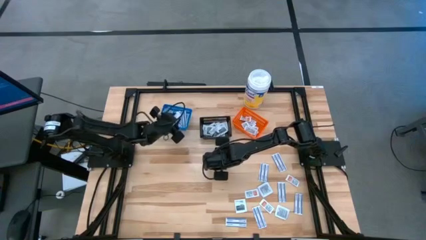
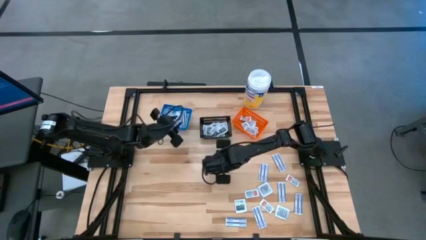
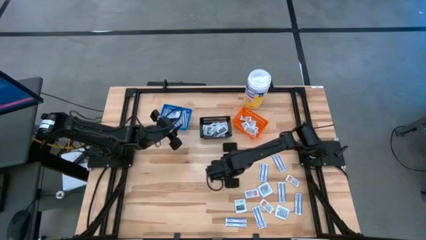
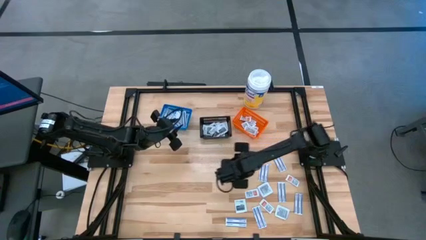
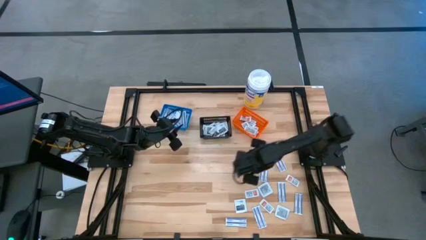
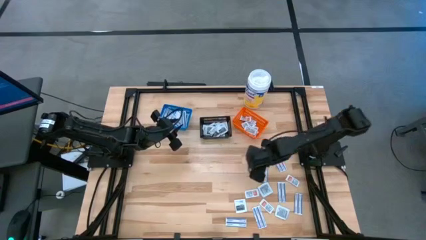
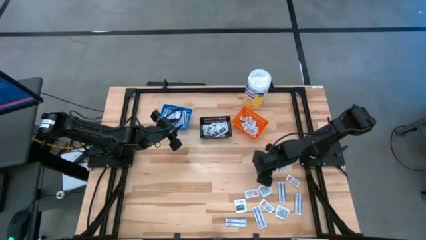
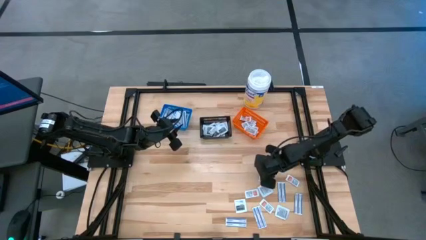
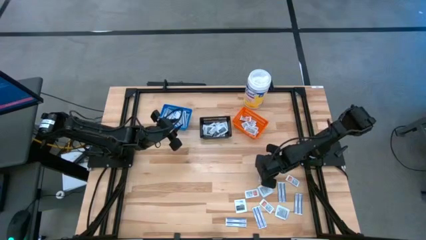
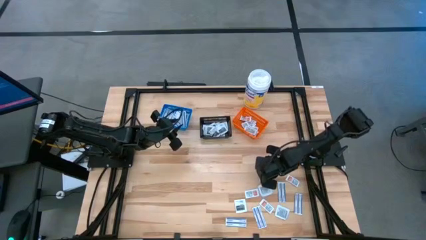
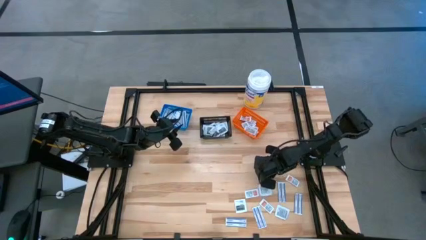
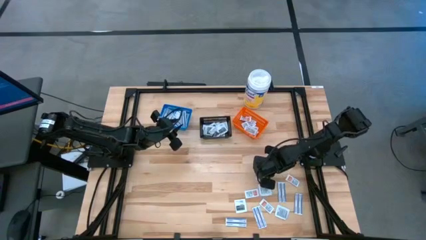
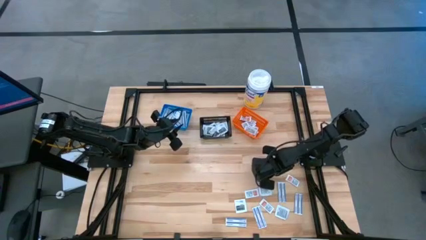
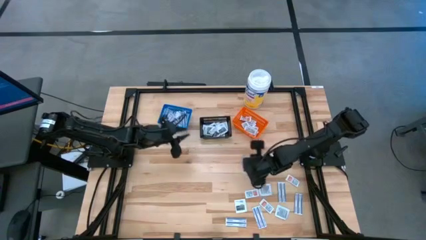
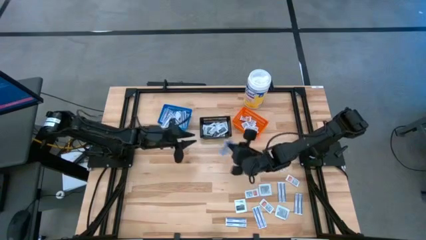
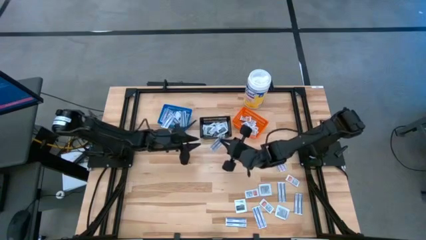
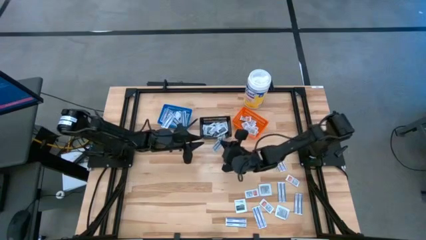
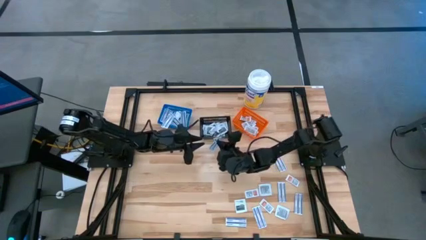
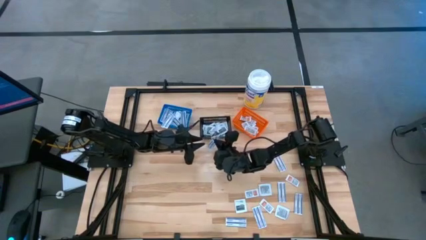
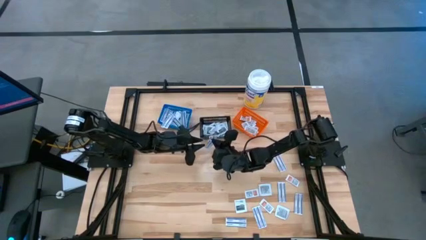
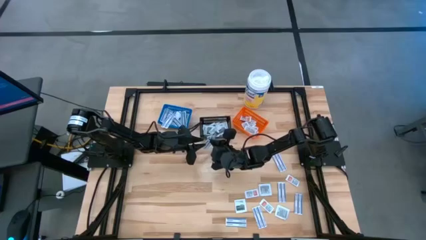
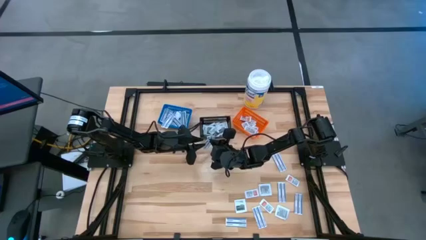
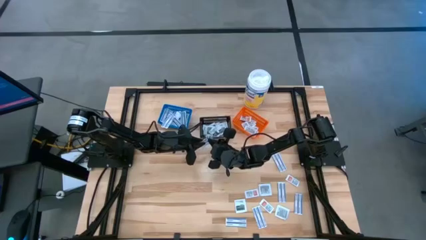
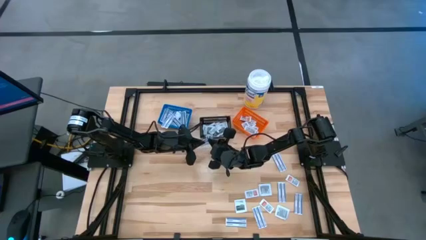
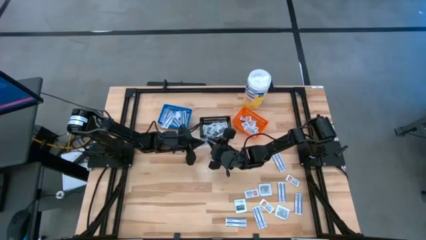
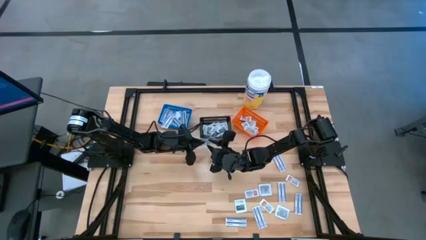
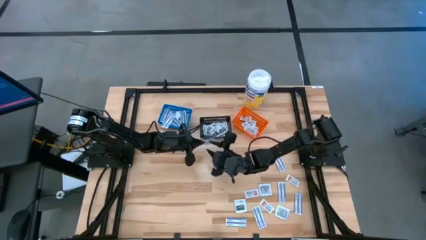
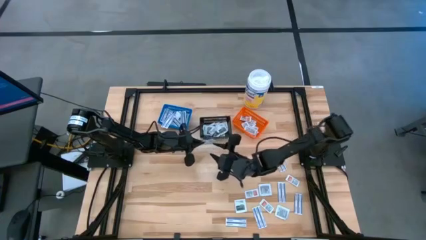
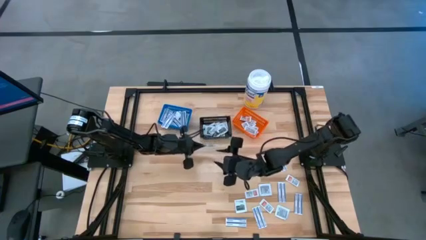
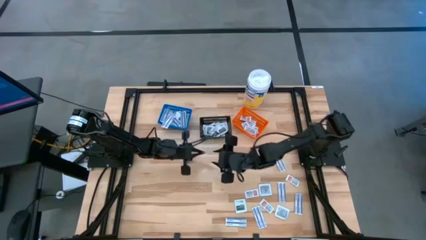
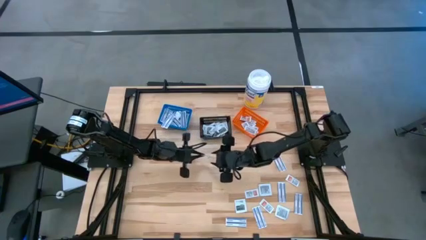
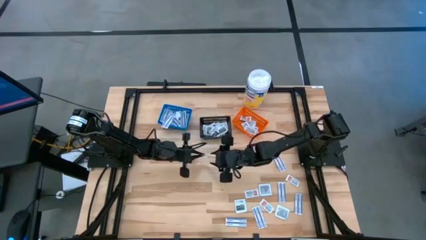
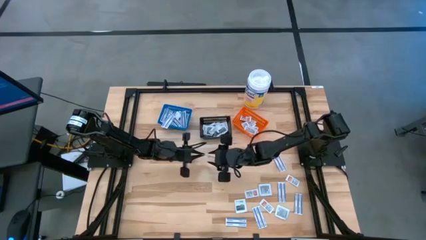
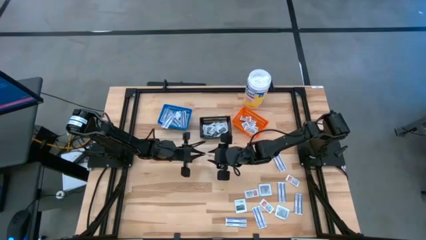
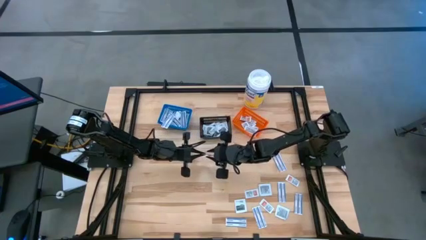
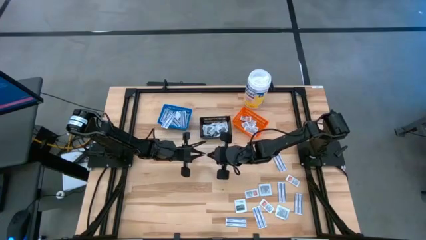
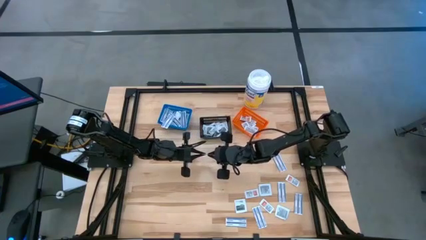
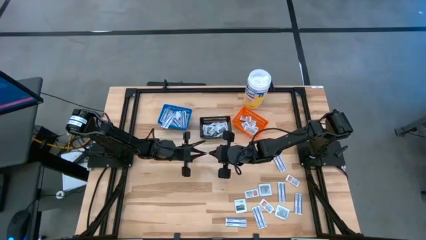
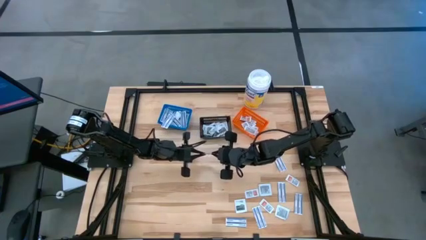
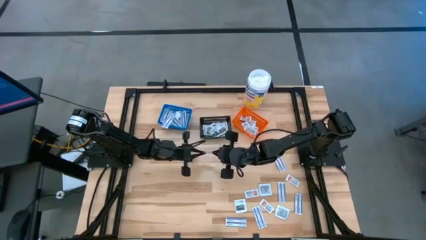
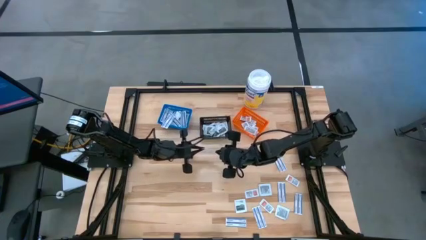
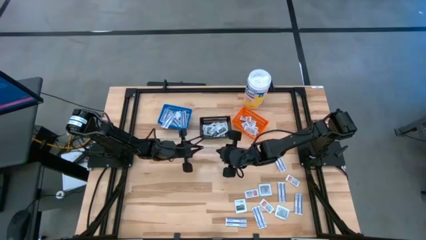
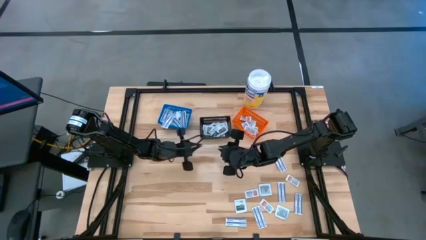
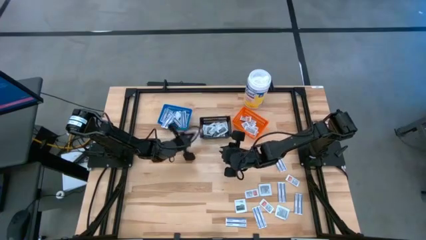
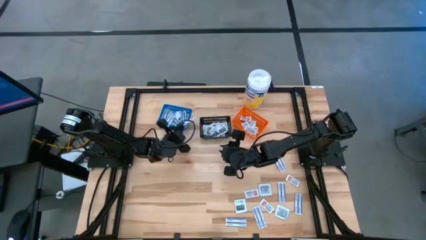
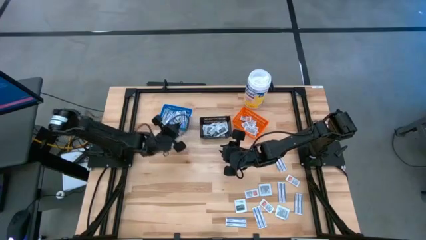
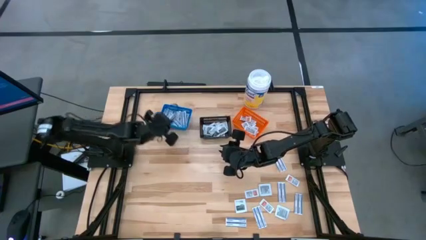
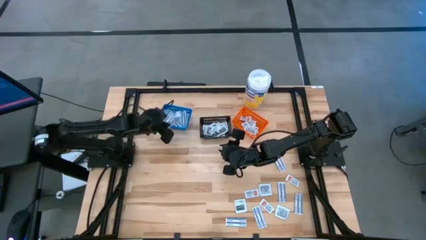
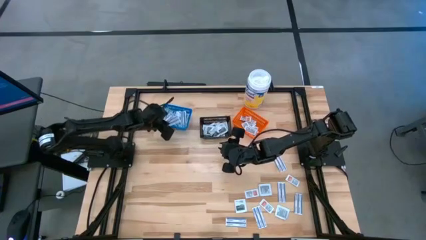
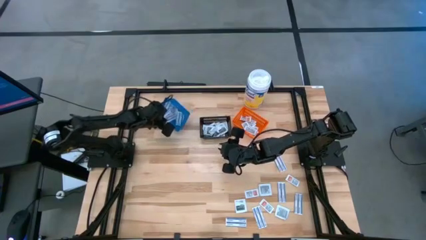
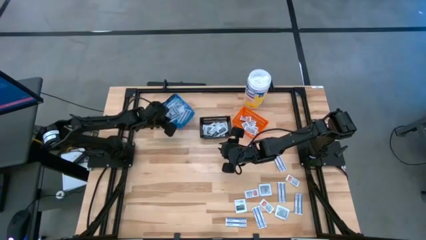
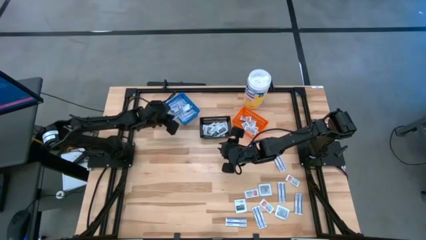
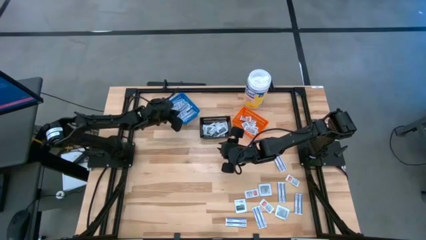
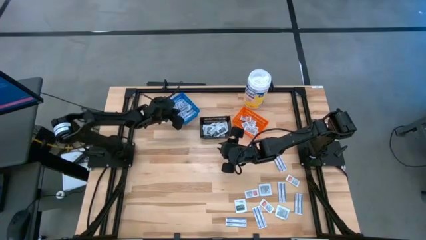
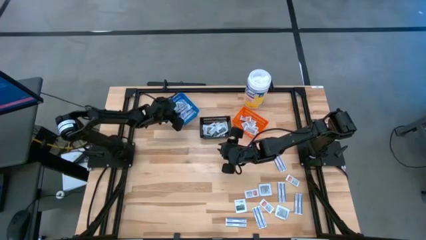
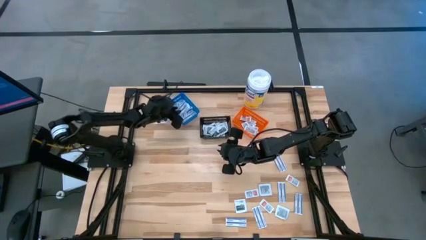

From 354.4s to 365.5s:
Task: Pick & Place First Aid Supplies
Put the bandage into the blue container

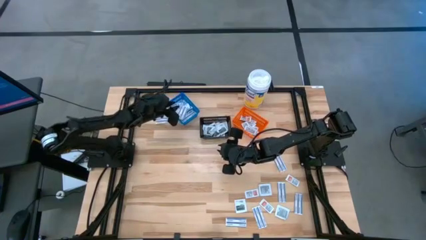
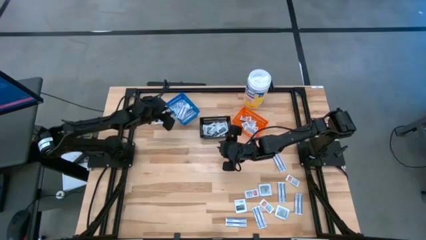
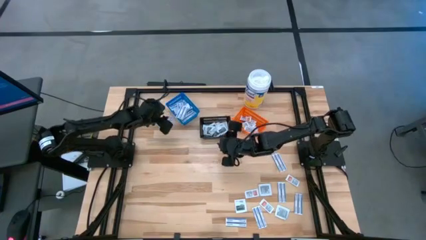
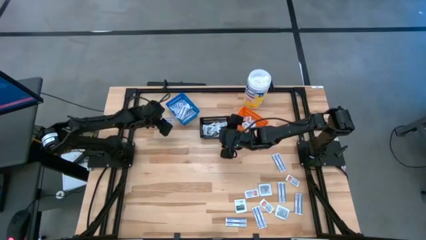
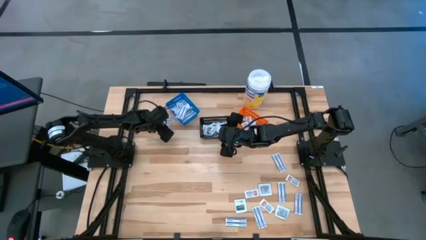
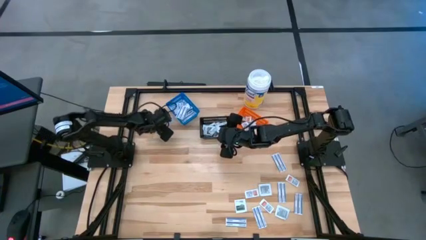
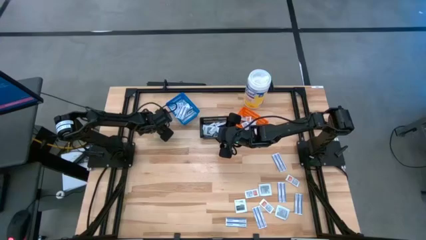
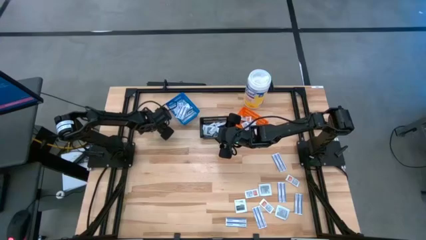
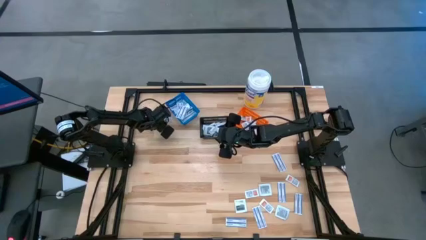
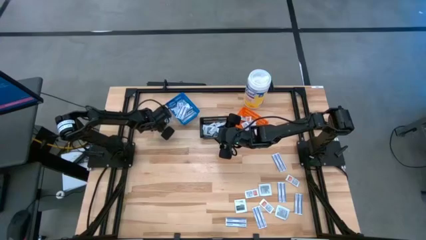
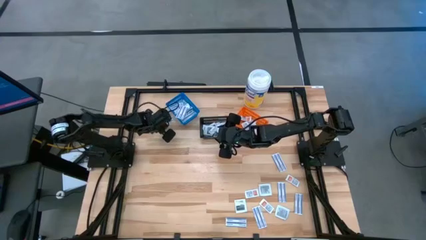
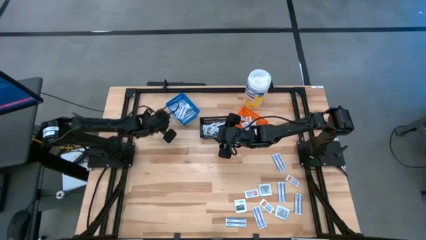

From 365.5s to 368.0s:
Put the bandage into the bin

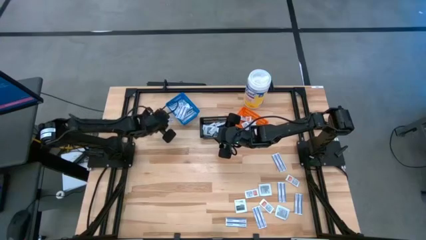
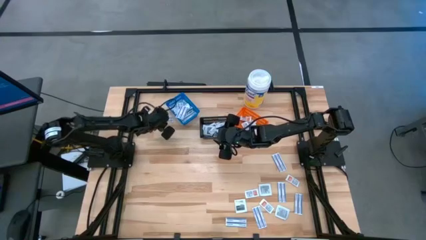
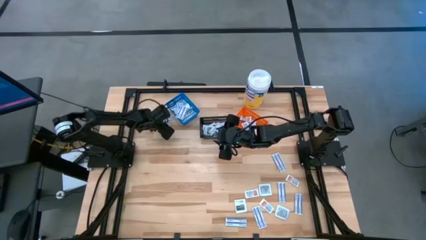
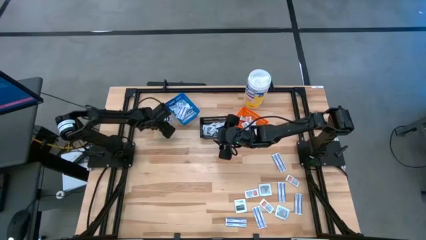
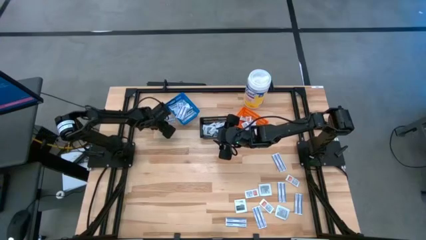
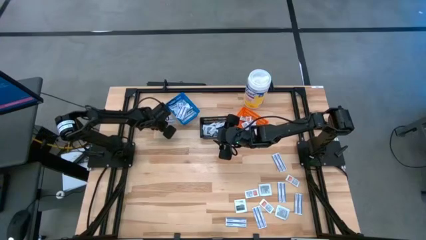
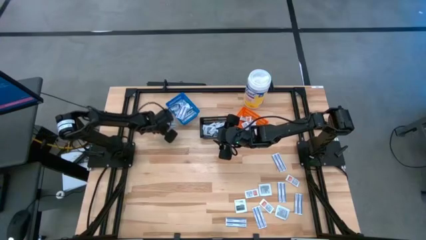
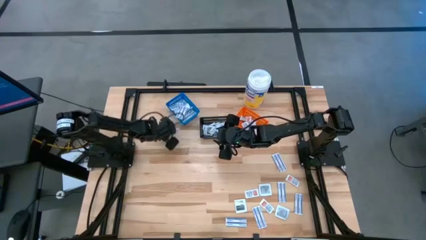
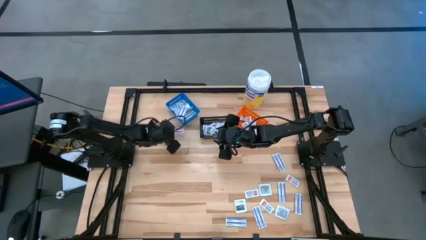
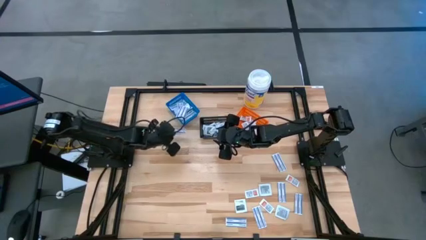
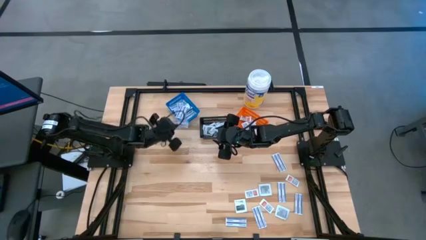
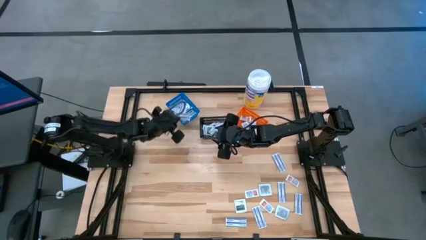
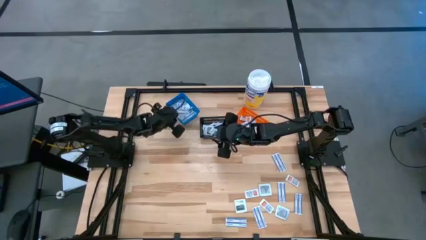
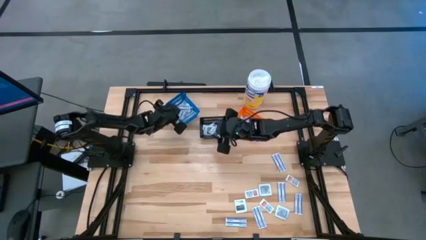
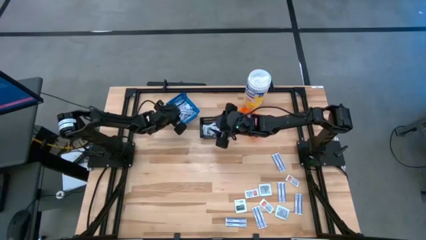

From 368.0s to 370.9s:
Put the bandage into the bin

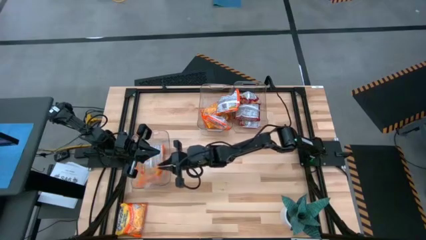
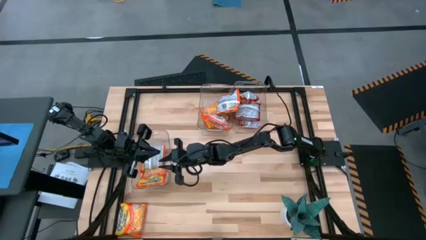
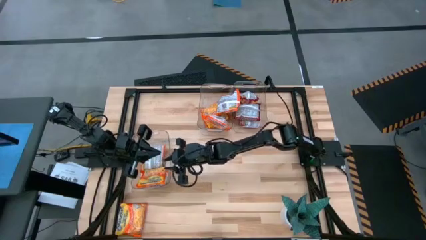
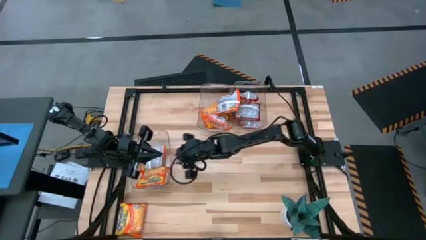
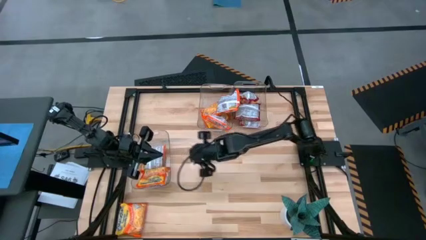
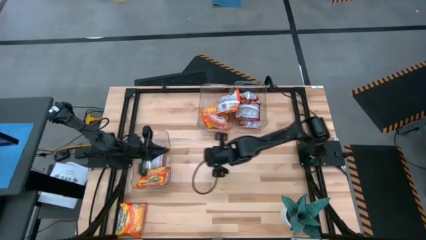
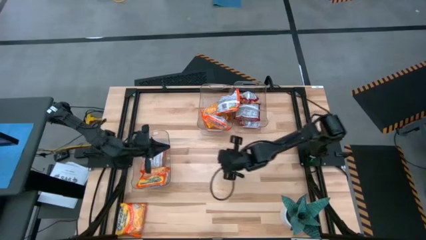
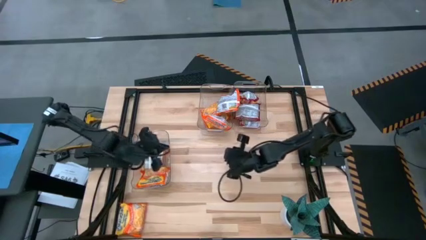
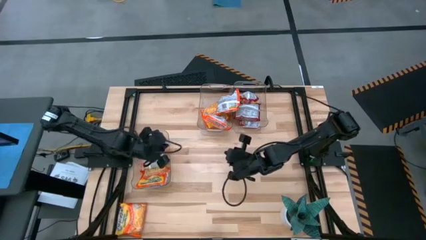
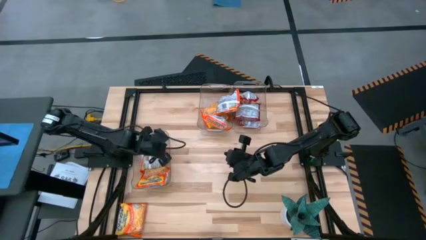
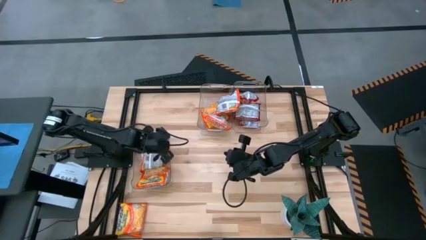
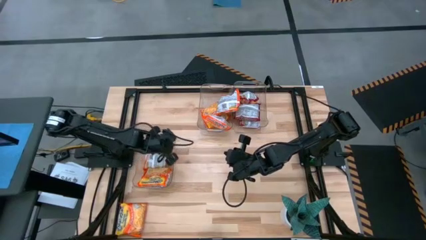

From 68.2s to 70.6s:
Task: Sort Maruchan noodles
Adjust the bottom transparent bin on the table
